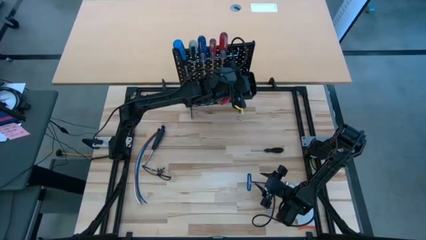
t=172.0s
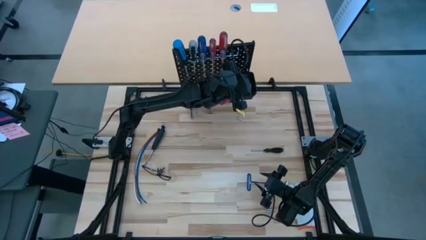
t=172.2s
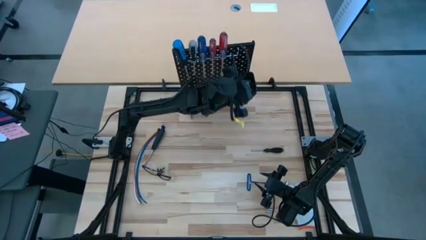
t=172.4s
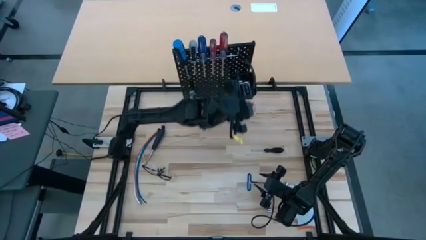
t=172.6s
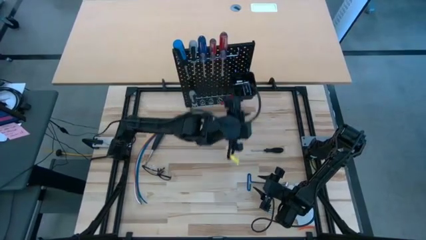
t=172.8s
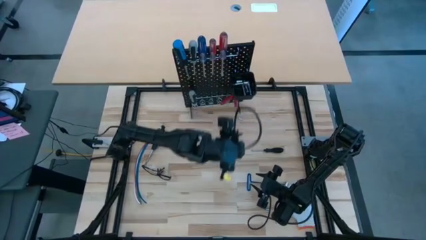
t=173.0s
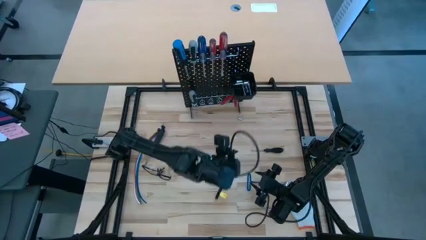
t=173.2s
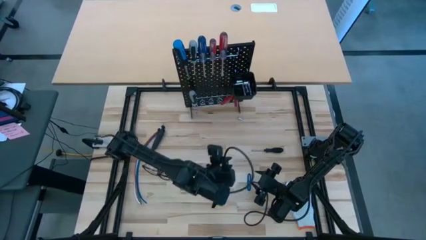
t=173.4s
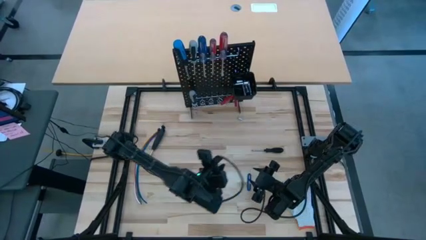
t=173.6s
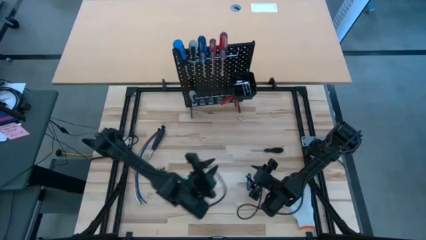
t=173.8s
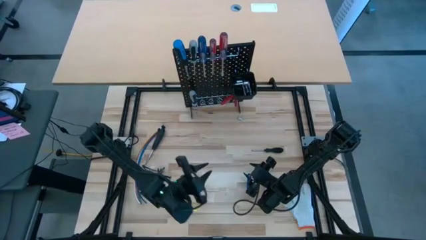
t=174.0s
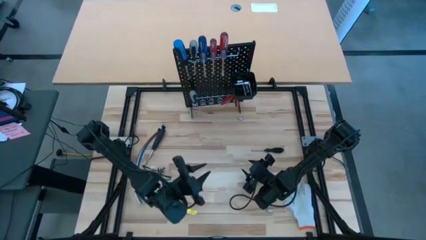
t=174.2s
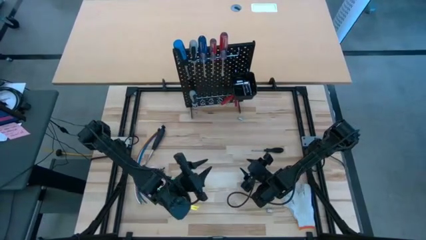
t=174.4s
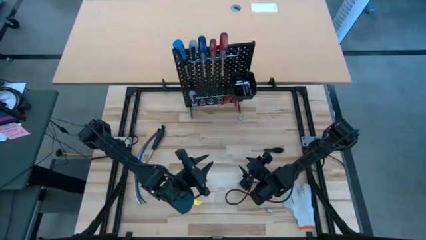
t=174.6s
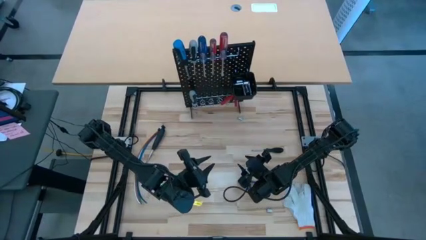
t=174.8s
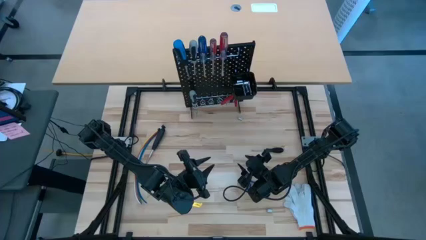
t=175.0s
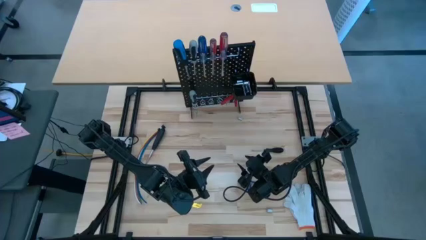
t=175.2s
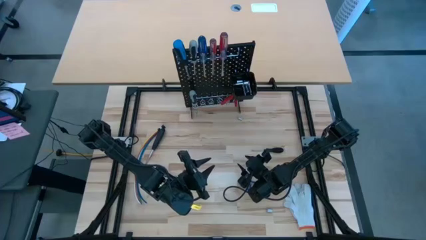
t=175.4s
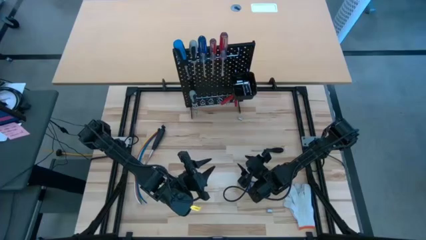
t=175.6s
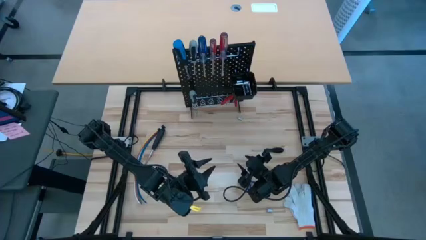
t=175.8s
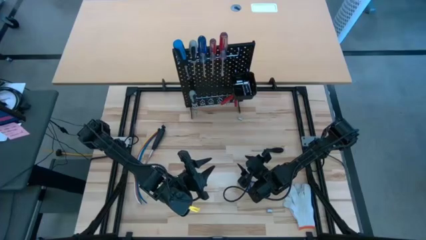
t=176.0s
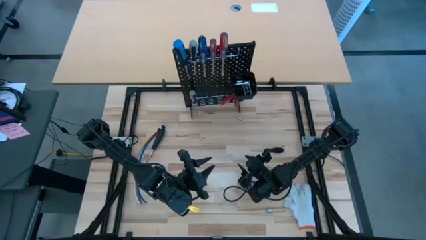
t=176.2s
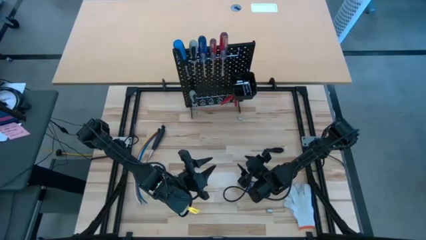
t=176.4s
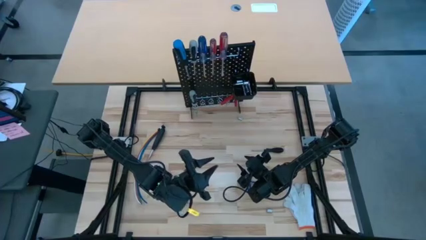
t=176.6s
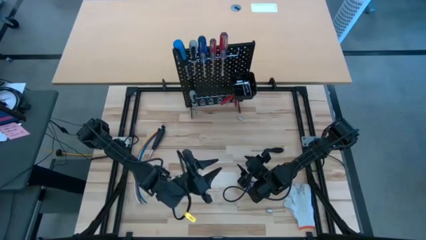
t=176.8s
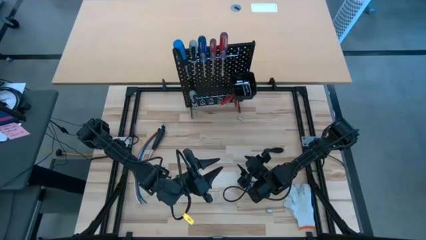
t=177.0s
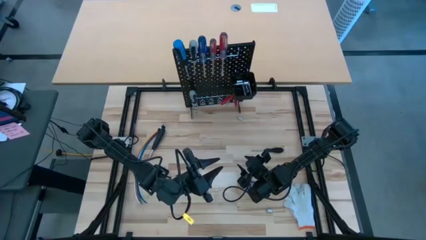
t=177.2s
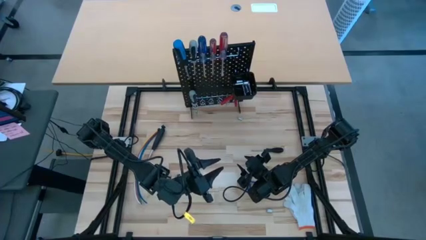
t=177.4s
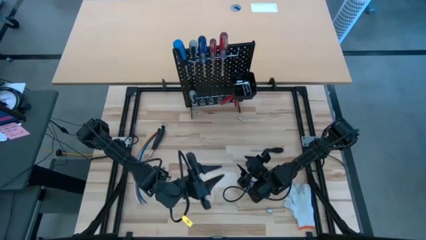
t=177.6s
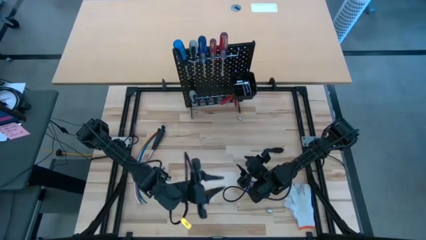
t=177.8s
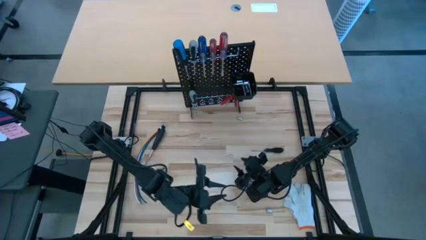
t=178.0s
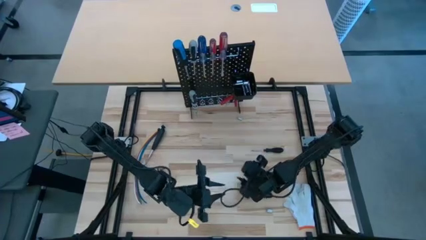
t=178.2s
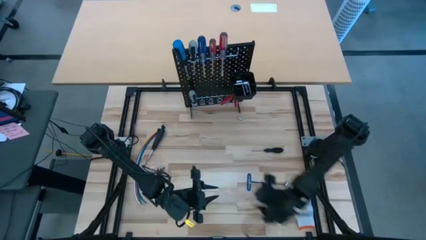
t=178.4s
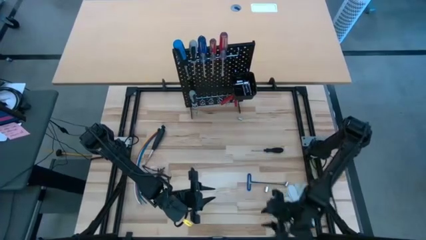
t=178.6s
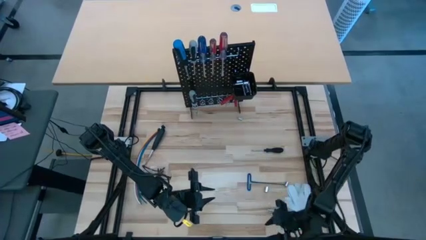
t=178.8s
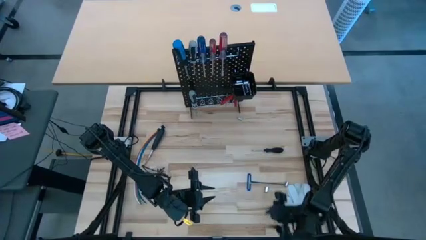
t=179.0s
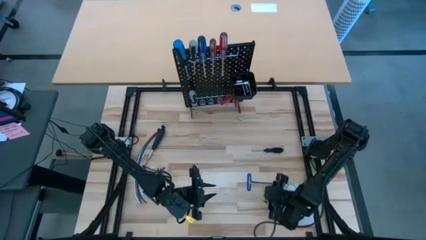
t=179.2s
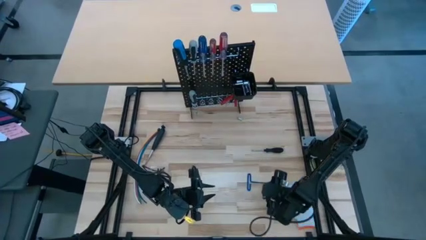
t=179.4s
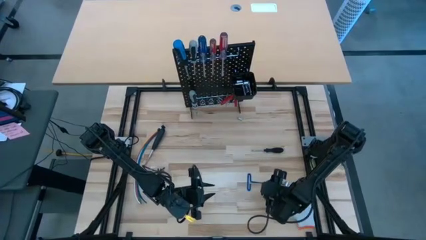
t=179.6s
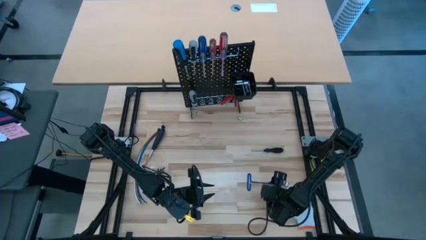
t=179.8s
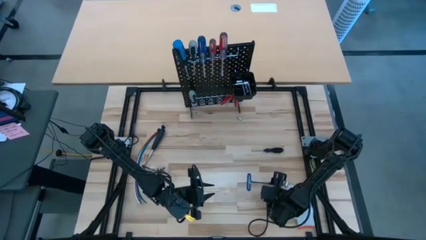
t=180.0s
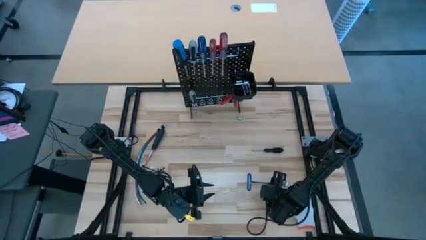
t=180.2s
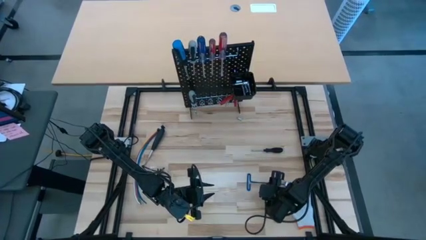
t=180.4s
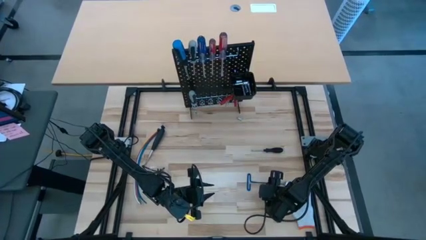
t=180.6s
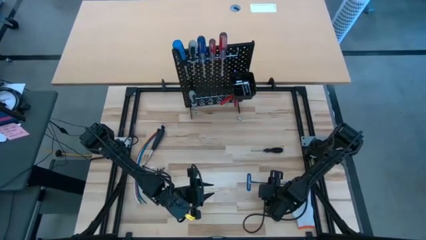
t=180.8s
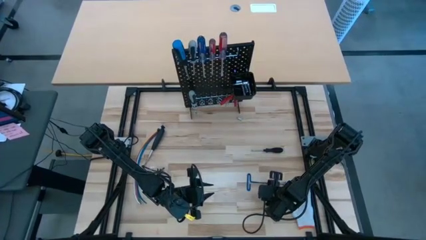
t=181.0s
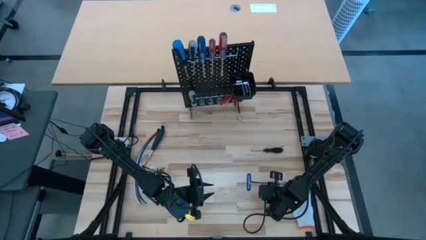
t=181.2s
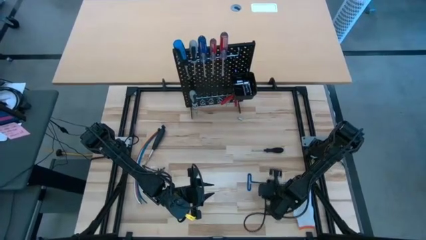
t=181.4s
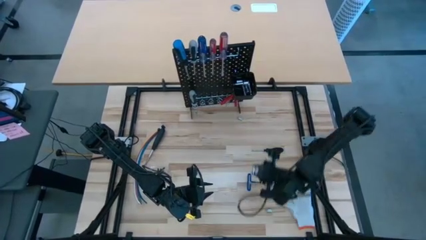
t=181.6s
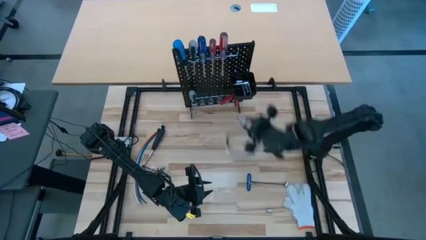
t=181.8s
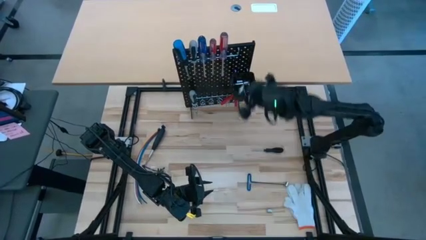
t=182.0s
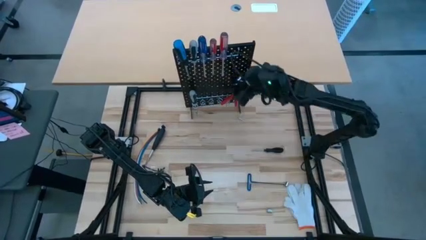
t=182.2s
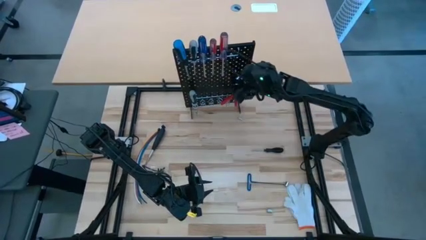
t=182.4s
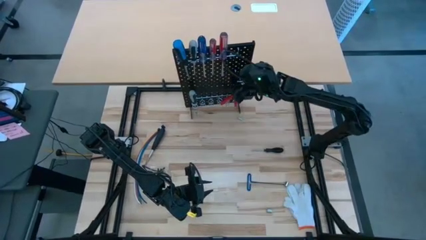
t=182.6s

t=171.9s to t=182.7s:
Task: Hang tools onto peg board
Put the socket into the black bin on the pegboard

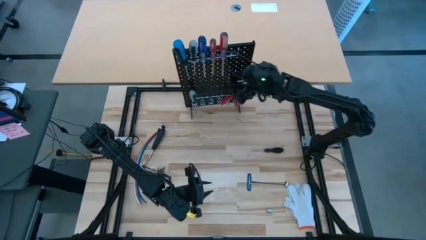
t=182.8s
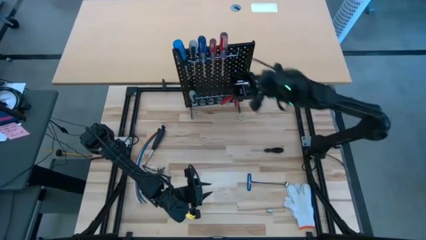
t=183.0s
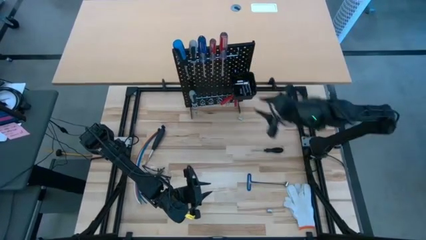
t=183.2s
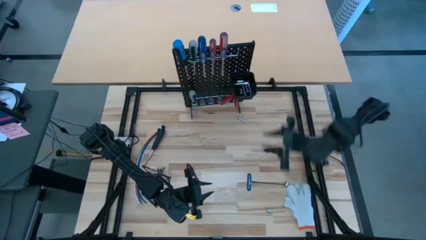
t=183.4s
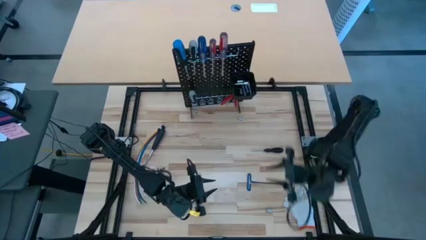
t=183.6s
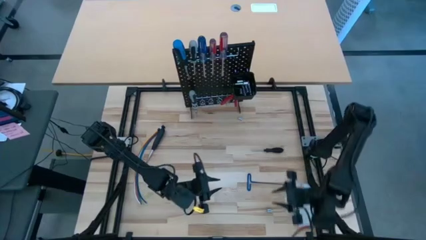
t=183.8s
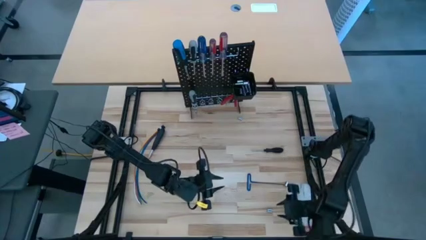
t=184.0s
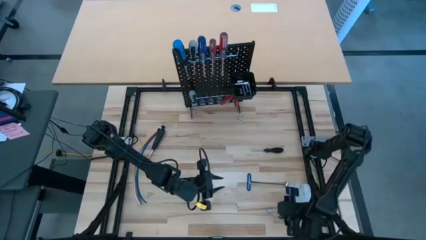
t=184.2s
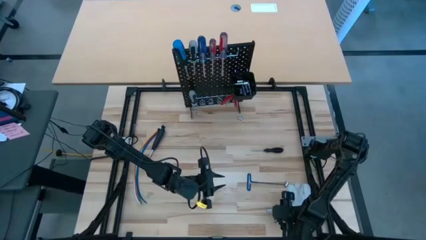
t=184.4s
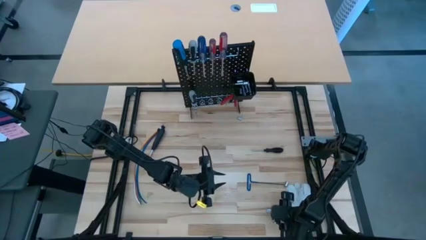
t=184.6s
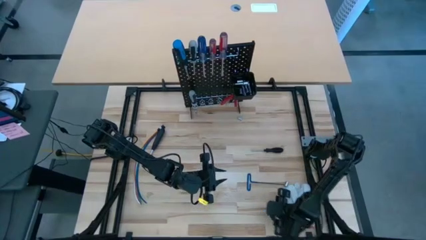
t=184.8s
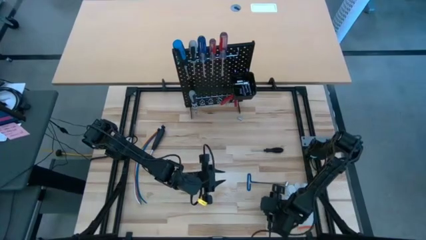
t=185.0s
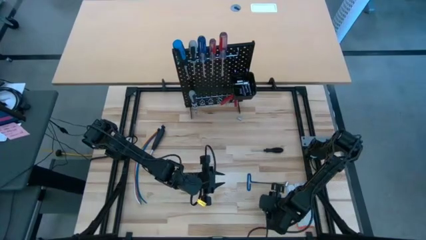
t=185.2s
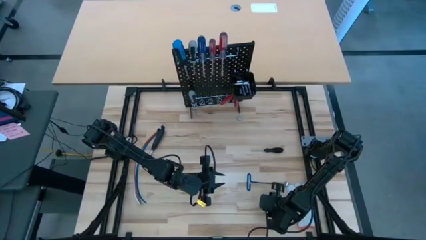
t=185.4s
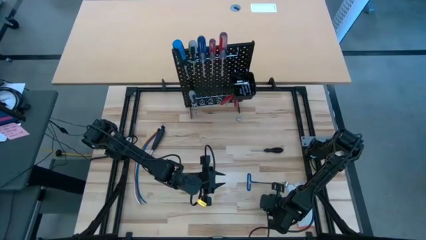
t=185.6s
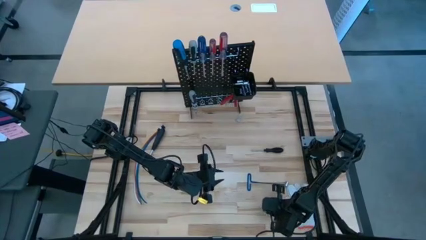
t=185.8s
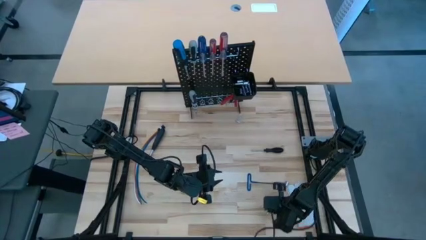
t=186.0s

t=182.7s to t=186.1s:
Put the socket into the black bin on the pegboard

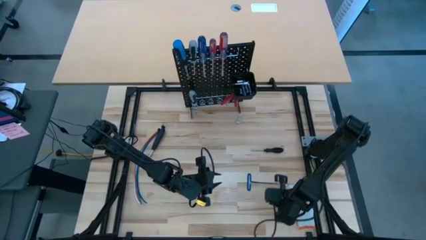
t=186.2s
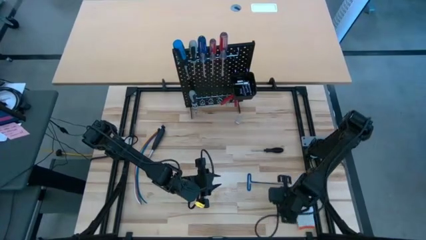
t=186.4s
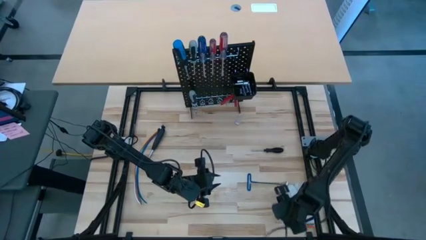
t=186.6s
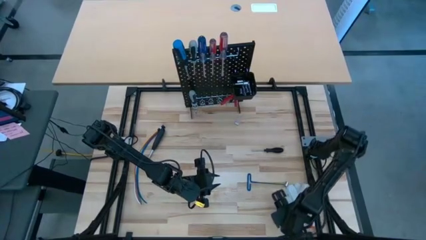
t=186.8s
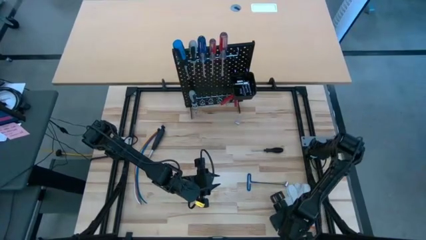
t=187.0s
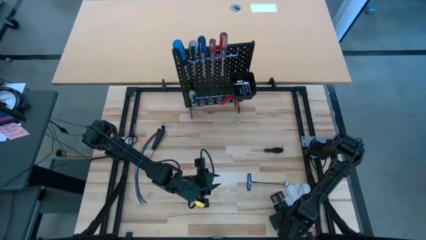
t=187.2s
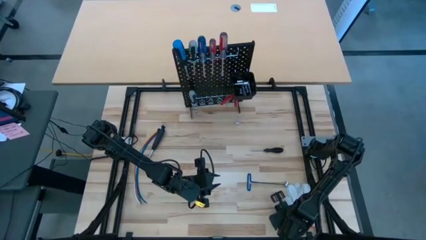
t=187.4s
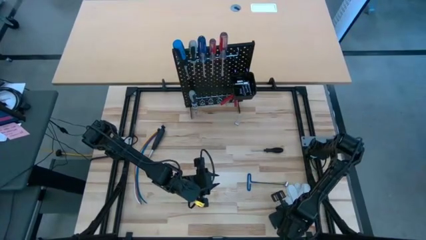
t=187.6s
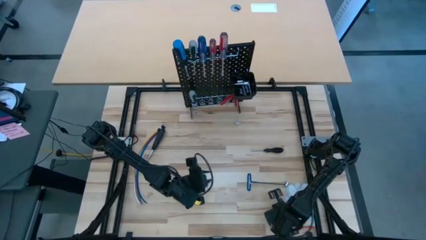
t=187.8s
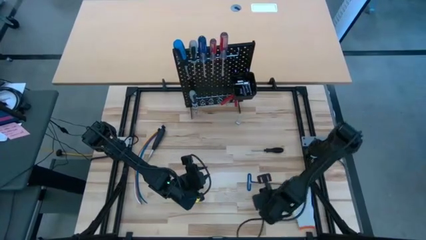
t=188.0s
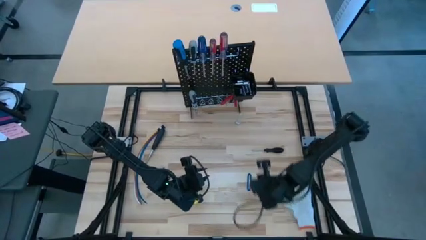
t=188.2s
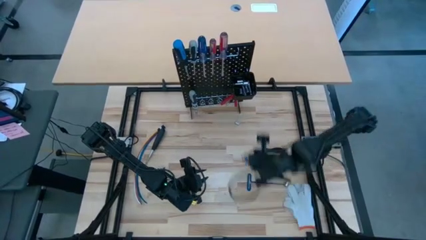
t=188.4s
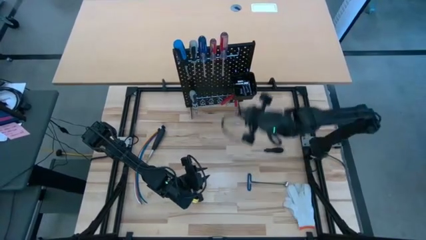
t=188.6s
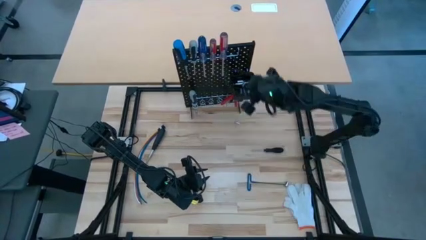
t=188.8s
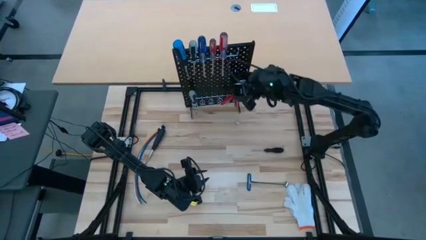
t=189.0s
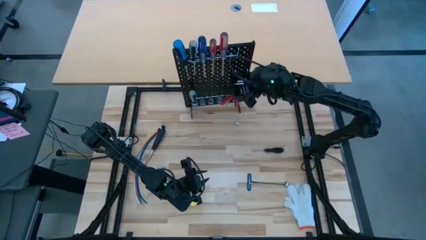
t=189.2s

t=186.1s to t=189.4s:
Put the socket into the black bin on the pegboard
